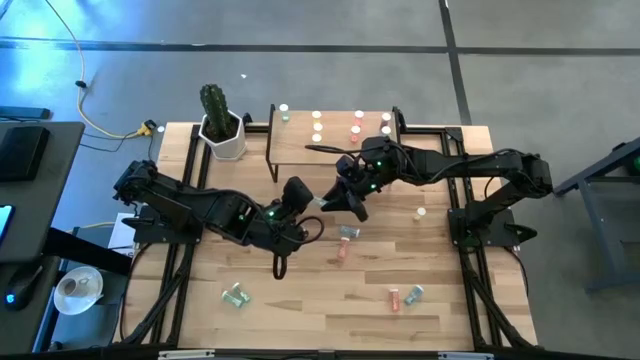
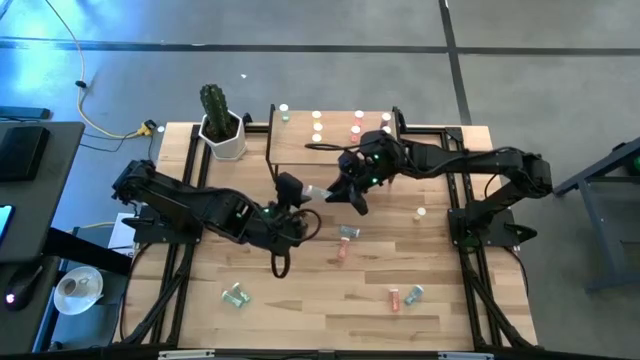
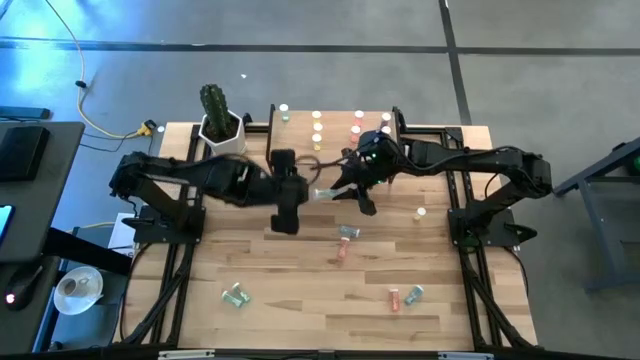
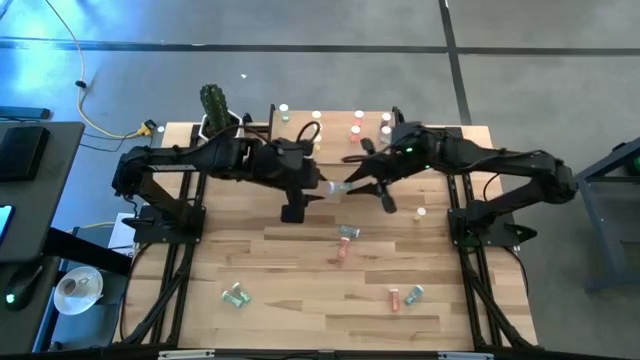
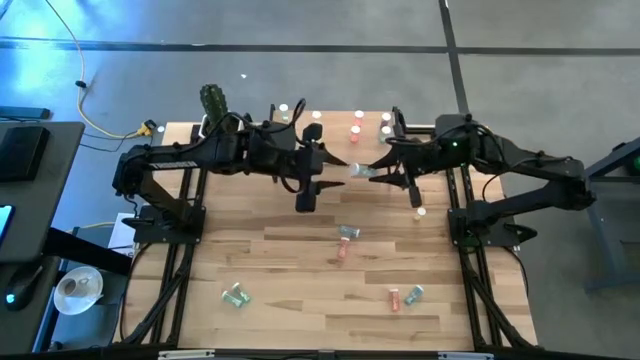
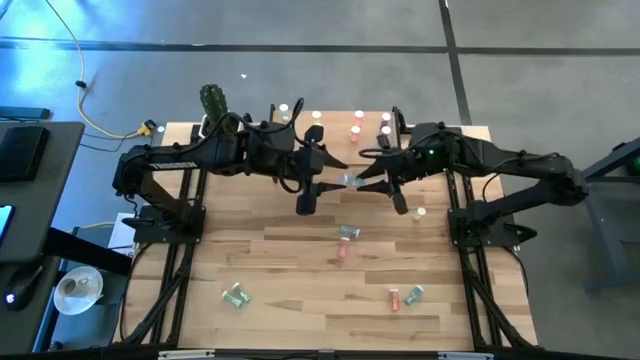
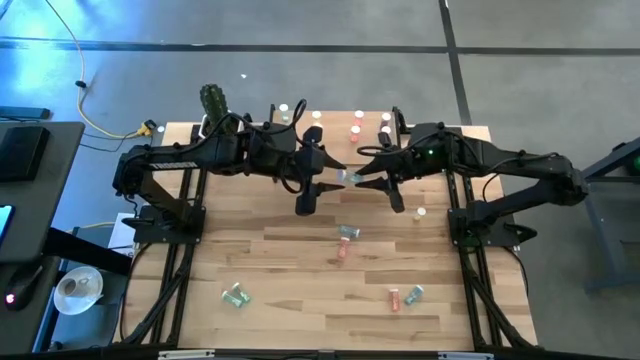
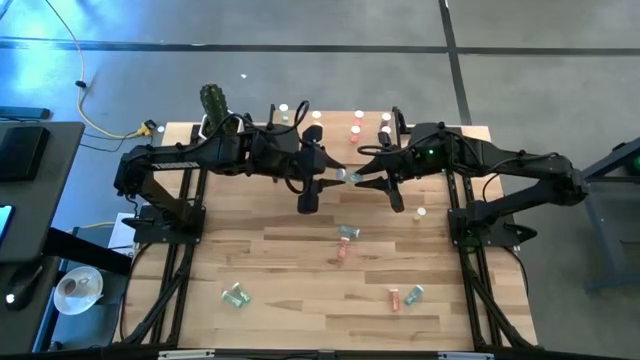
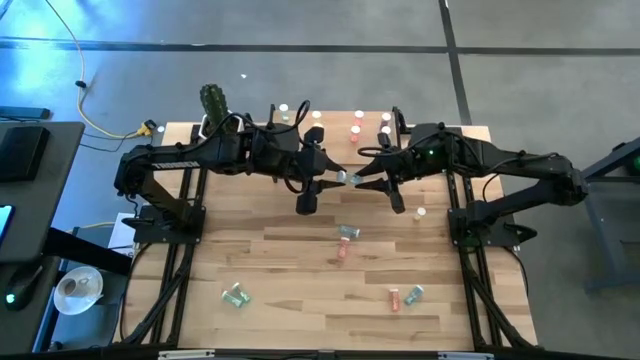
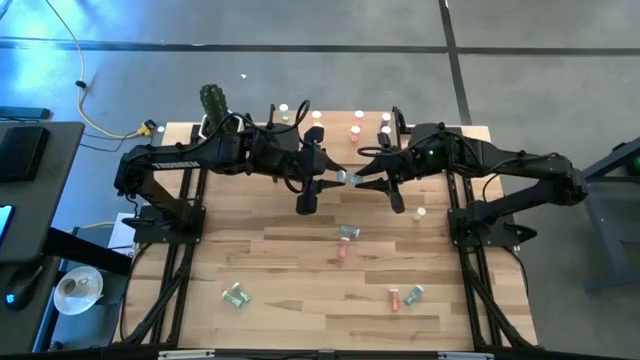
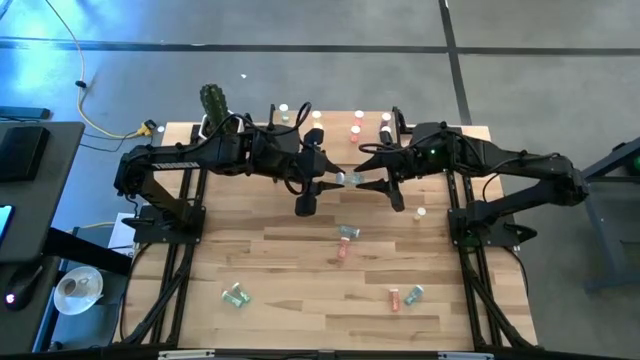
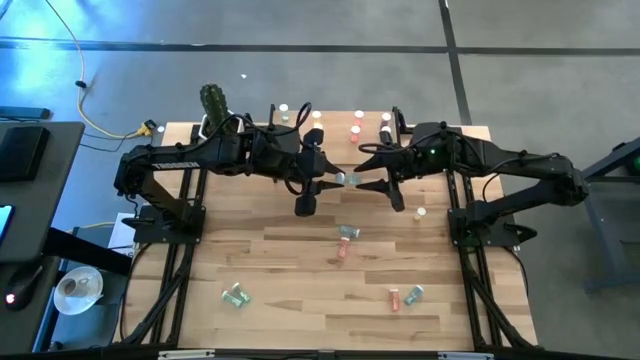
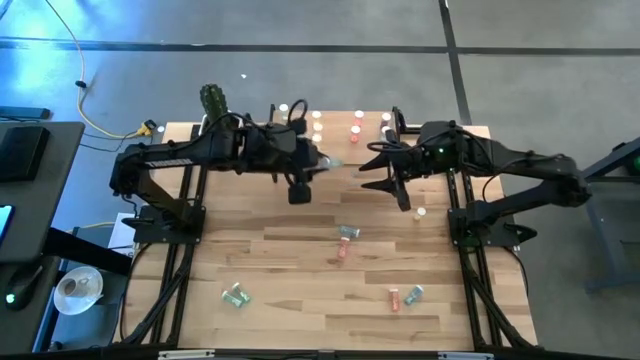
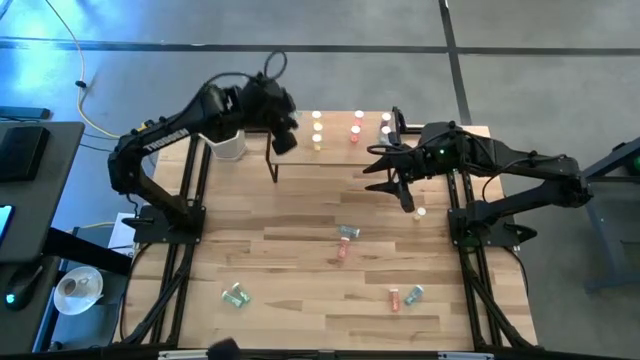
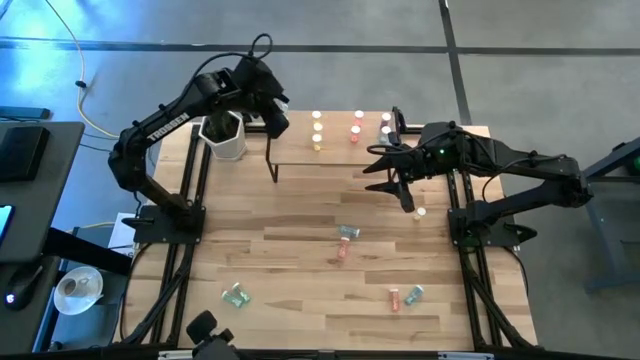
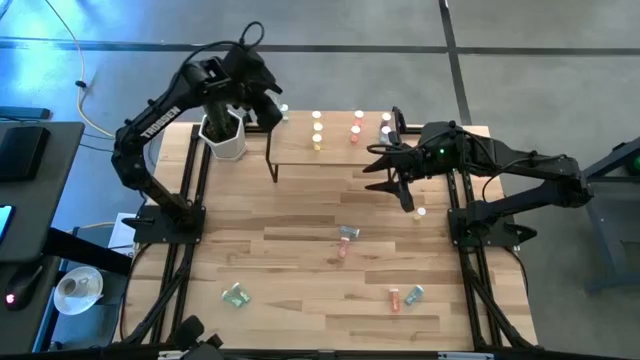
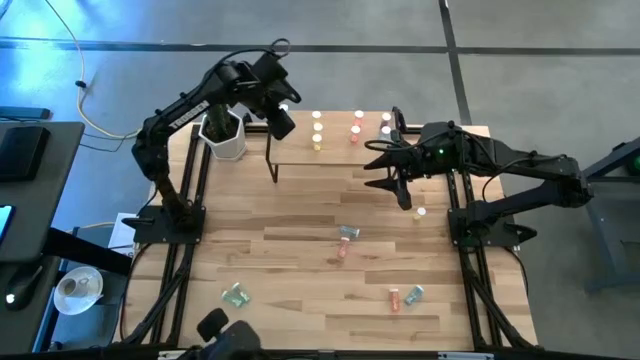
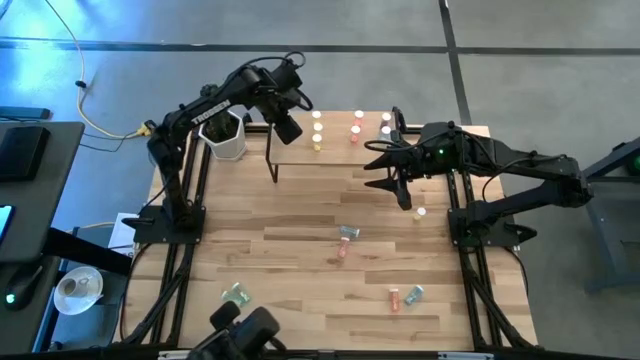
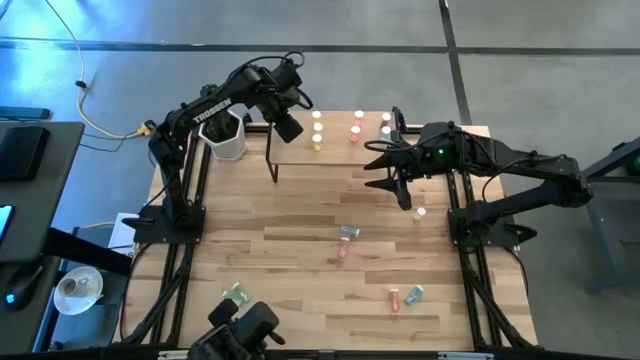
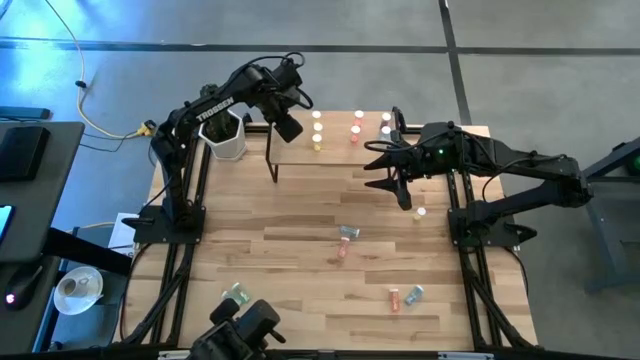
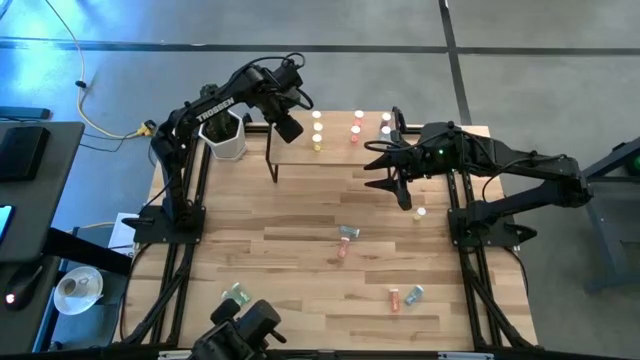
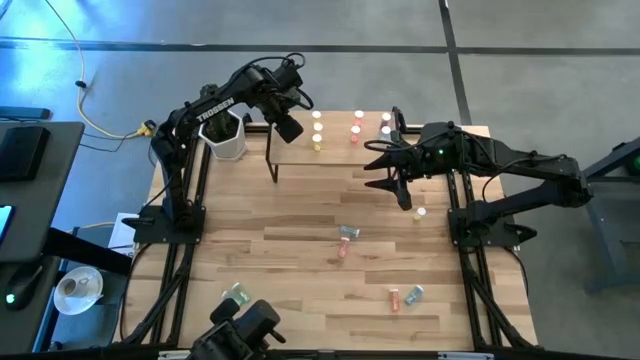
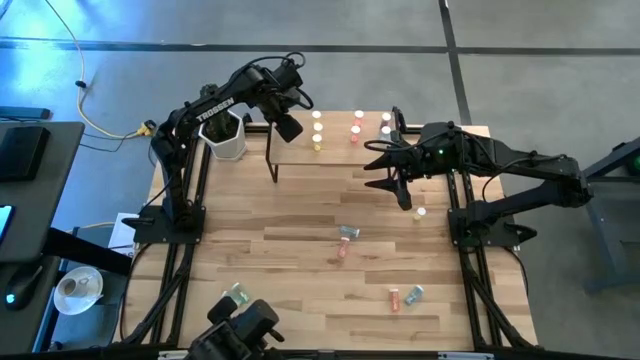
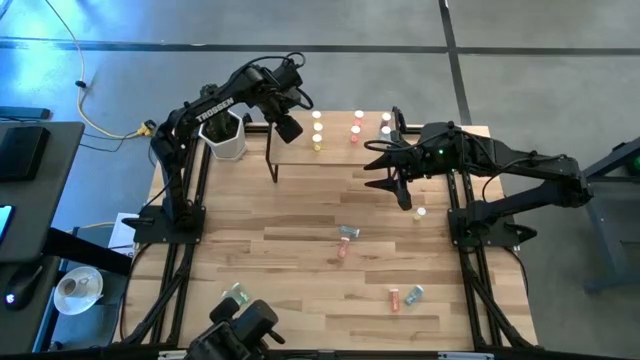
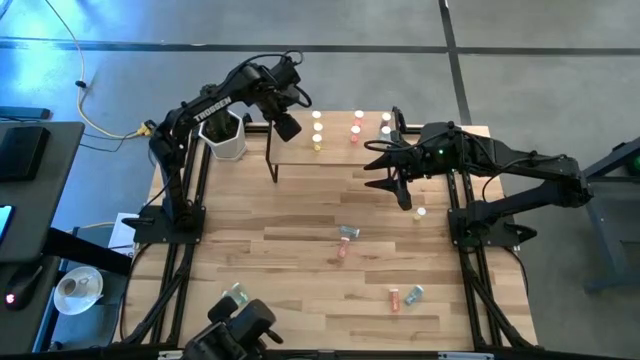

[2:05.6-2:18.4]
Task: Pick and place medicine bottles onto shelf by color
Adjust the light blue pill bottle on the shelf

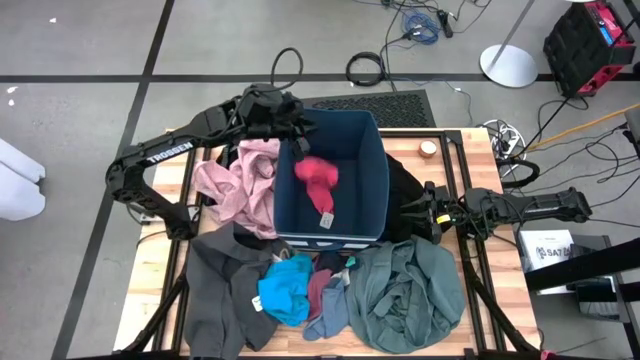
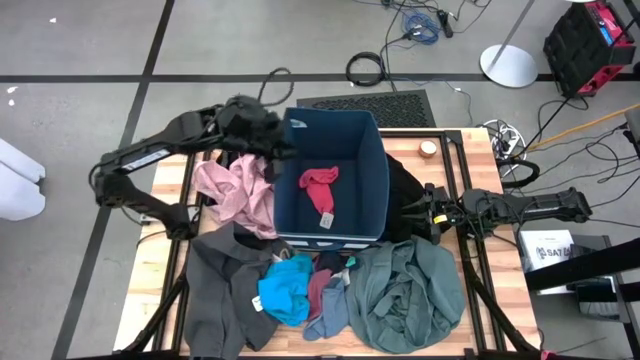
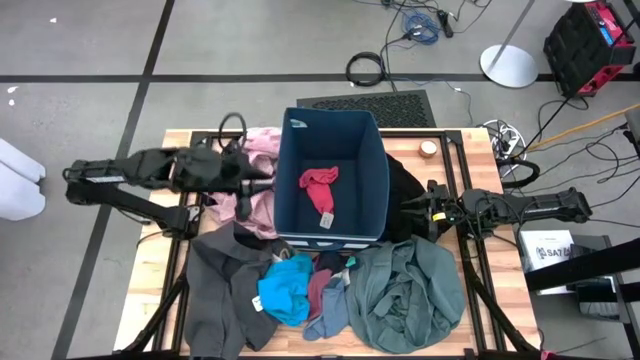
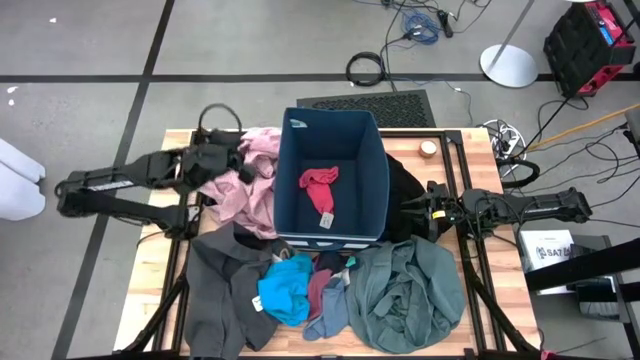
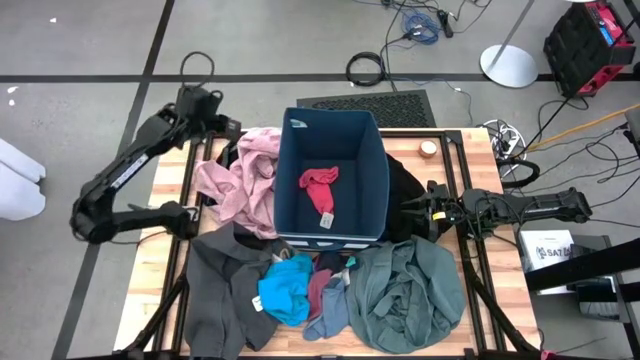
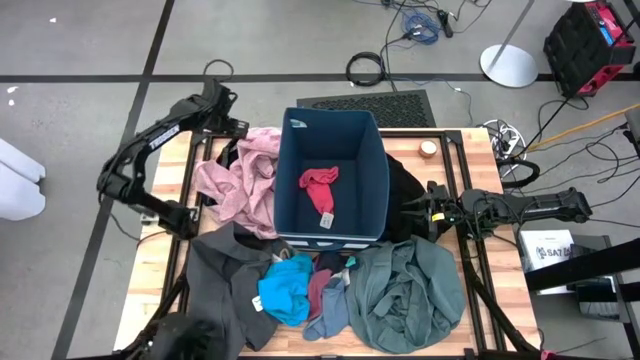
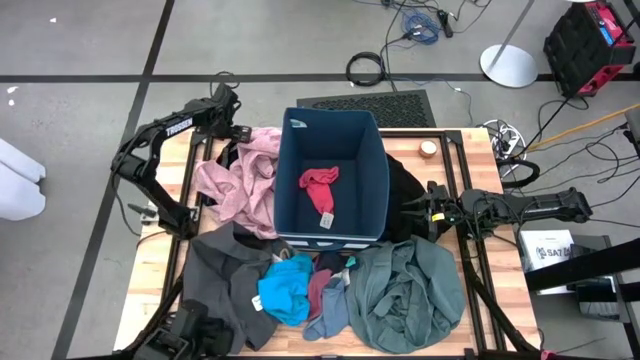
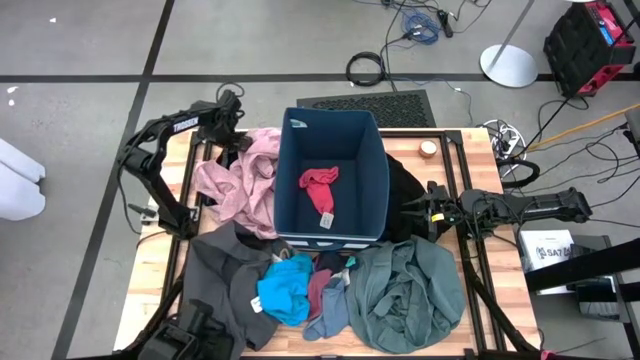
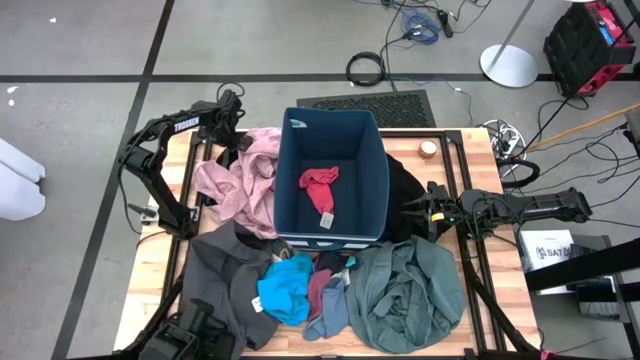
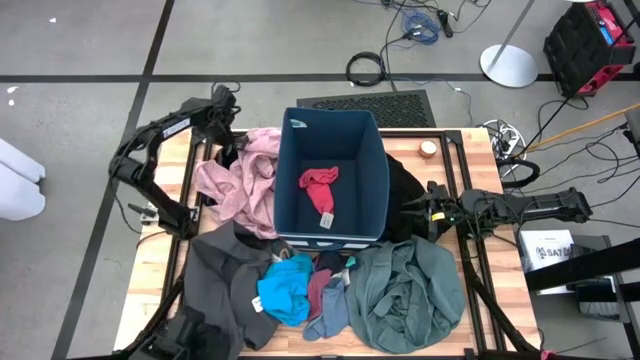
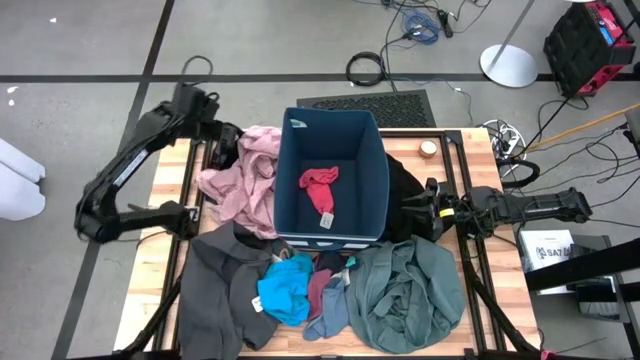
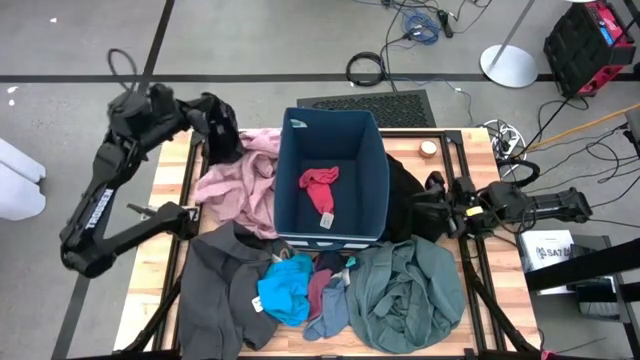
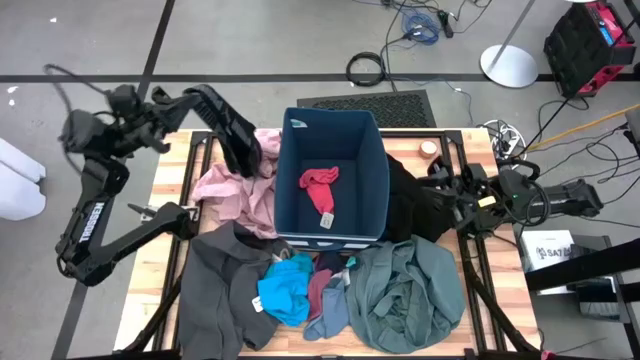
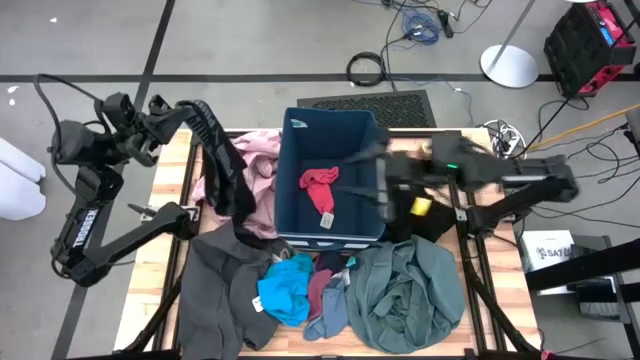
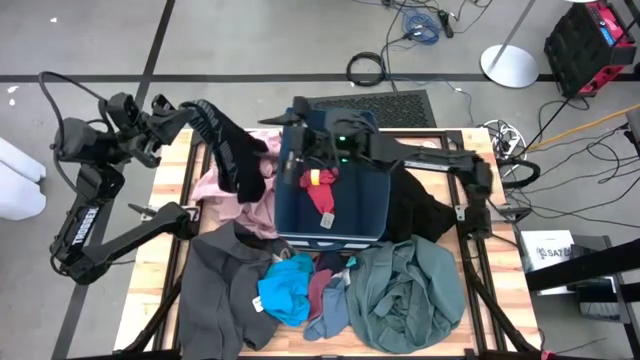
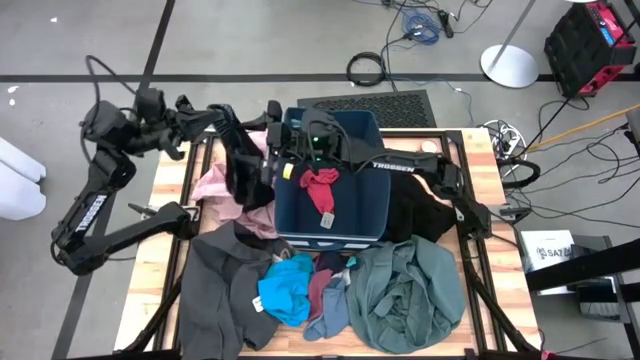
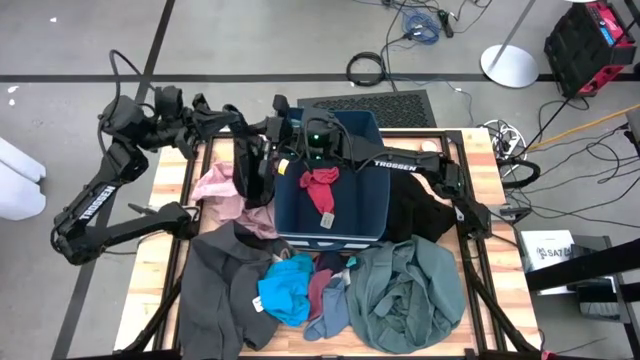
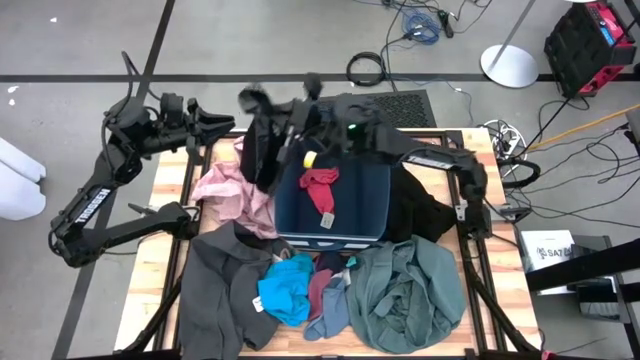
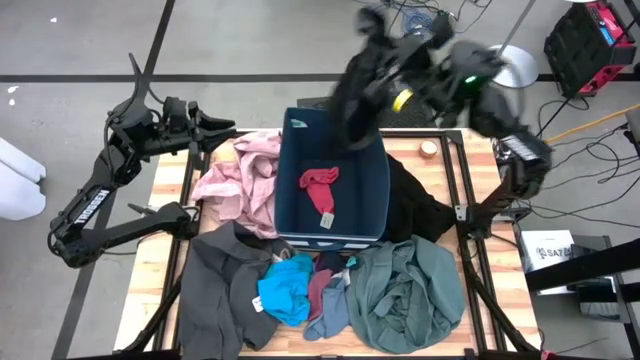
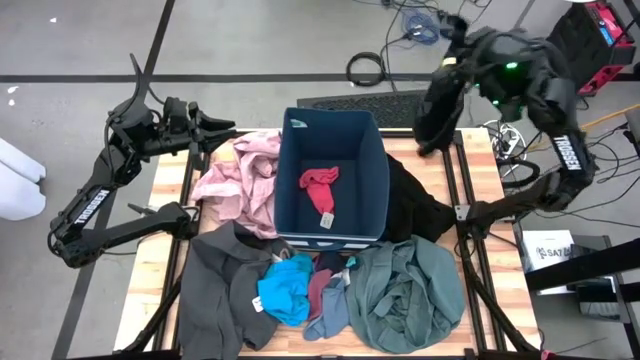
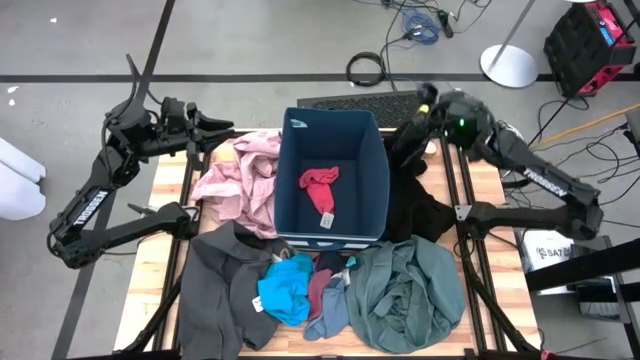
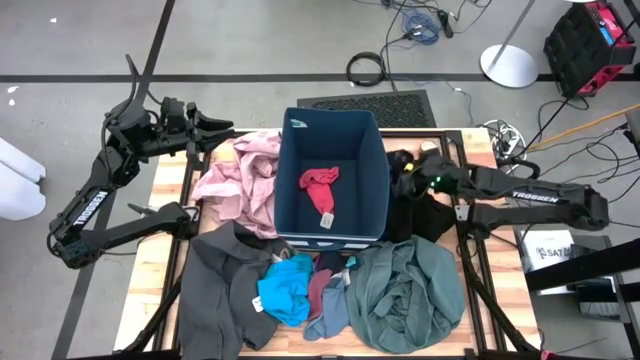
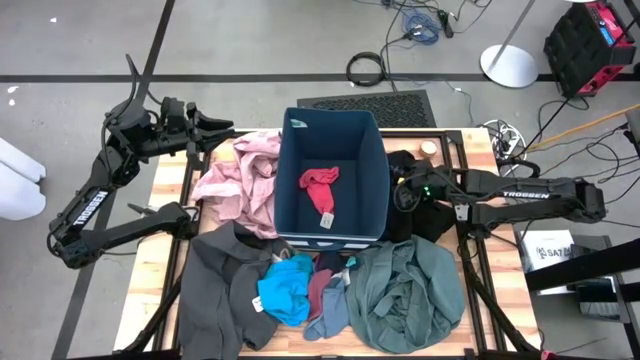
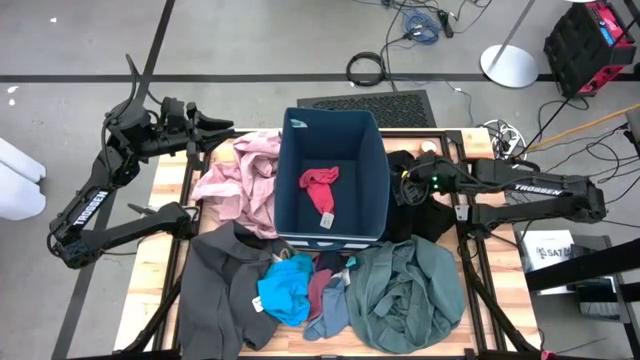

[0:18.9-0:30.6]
Task: Sort clothes
Move the black boxer to the right of the table
